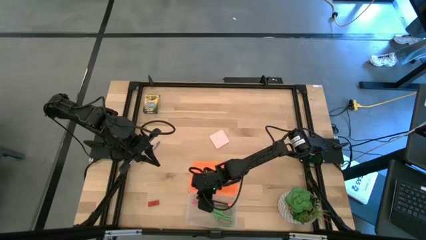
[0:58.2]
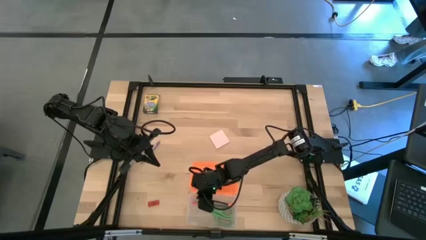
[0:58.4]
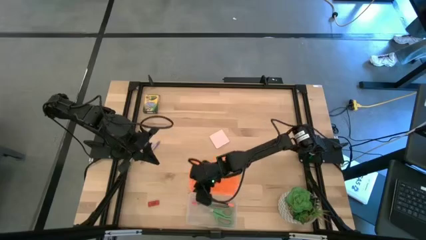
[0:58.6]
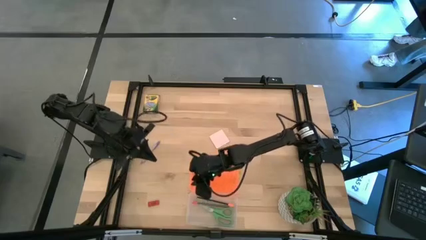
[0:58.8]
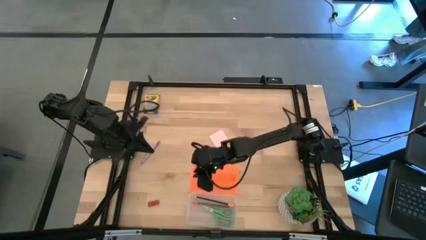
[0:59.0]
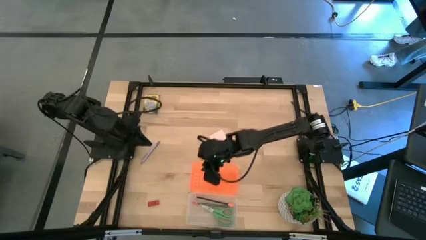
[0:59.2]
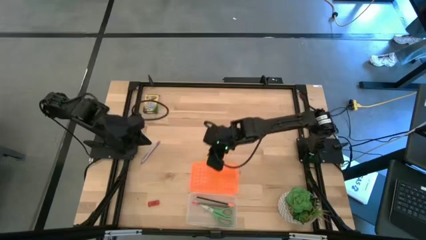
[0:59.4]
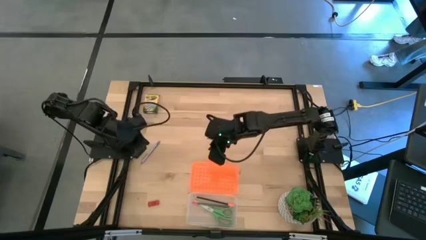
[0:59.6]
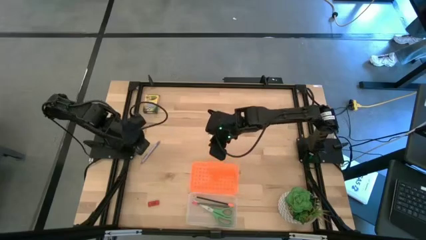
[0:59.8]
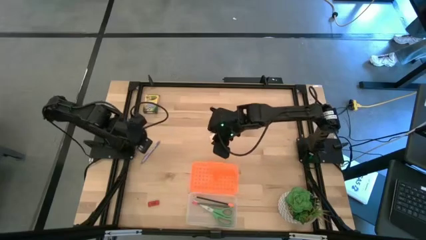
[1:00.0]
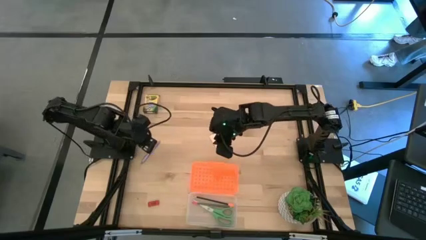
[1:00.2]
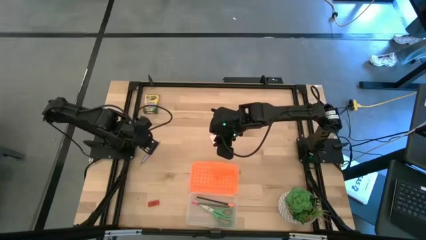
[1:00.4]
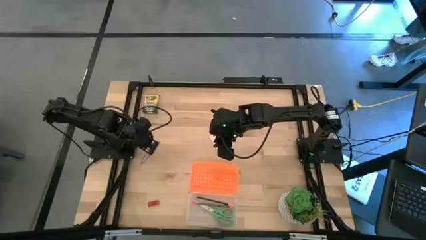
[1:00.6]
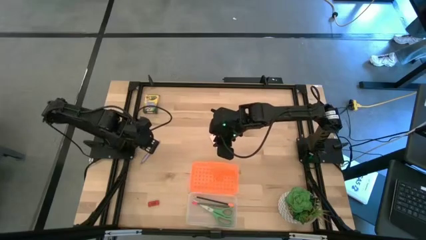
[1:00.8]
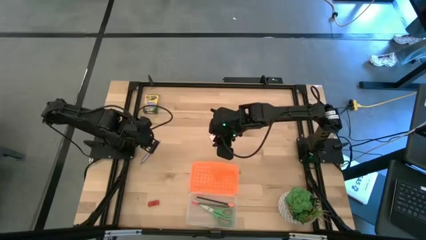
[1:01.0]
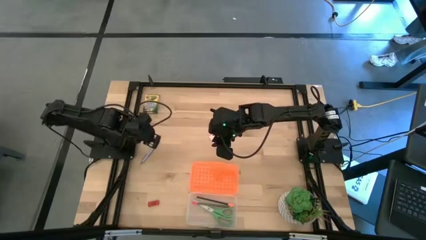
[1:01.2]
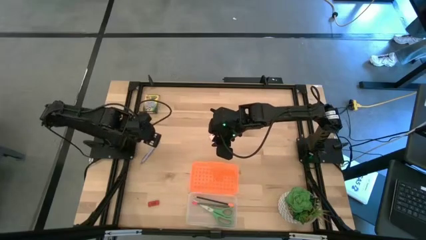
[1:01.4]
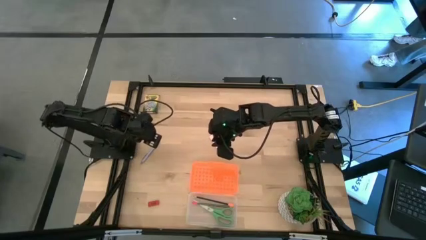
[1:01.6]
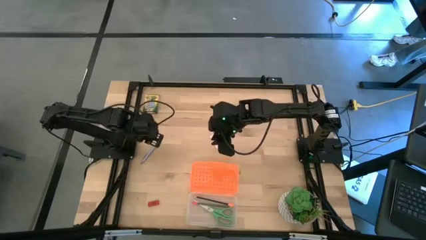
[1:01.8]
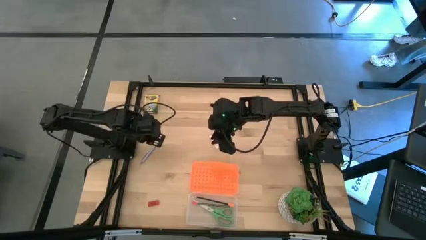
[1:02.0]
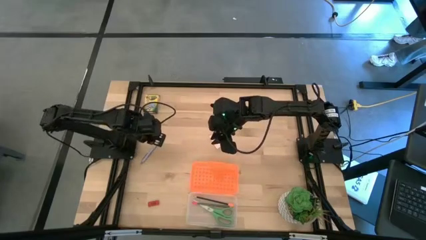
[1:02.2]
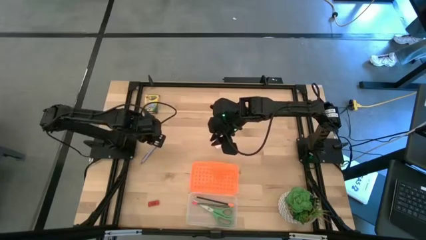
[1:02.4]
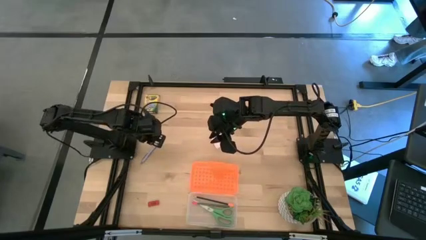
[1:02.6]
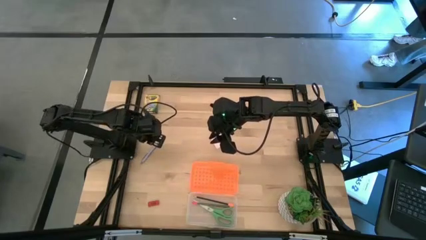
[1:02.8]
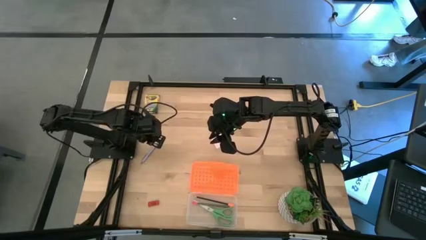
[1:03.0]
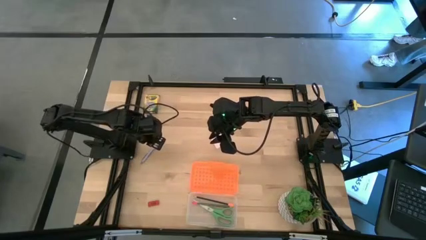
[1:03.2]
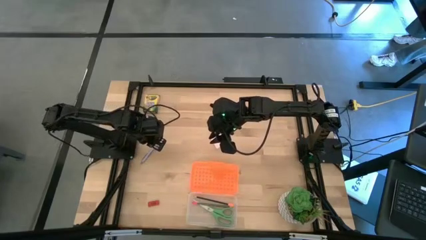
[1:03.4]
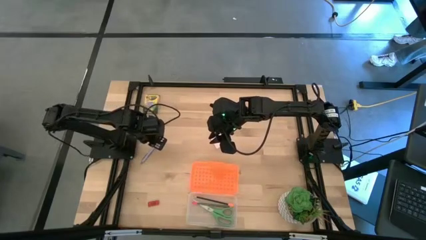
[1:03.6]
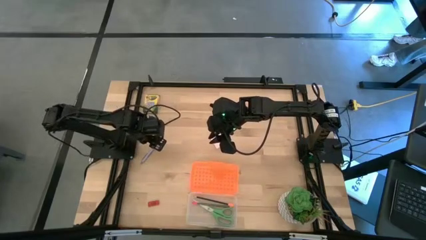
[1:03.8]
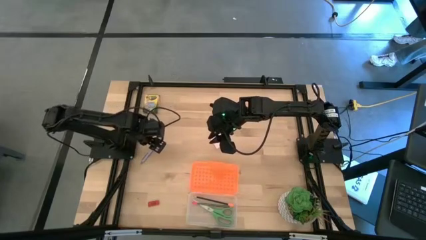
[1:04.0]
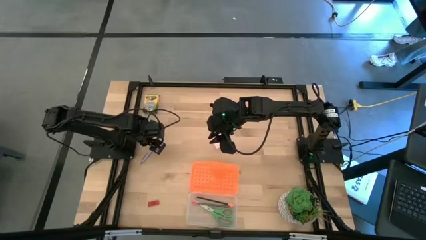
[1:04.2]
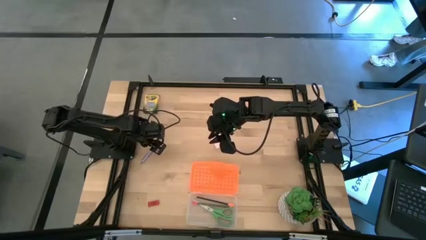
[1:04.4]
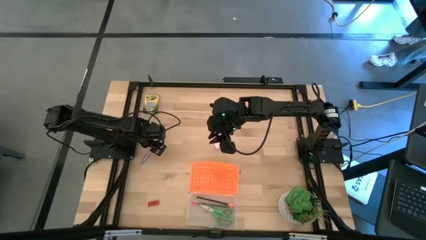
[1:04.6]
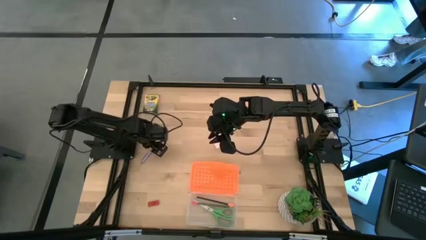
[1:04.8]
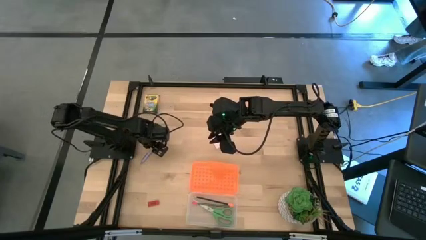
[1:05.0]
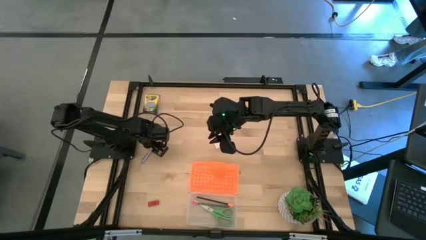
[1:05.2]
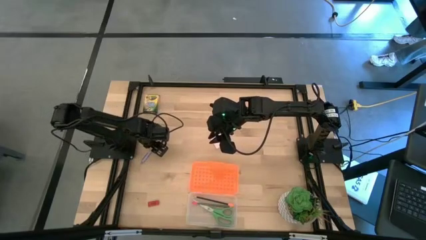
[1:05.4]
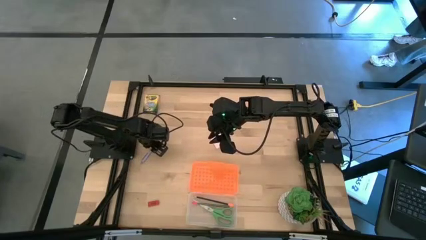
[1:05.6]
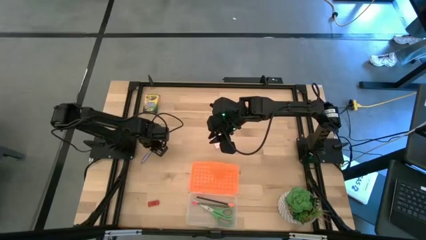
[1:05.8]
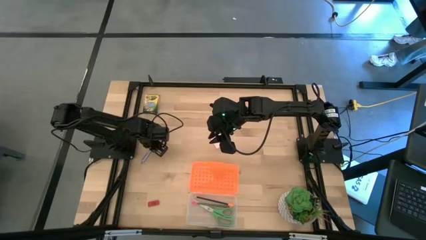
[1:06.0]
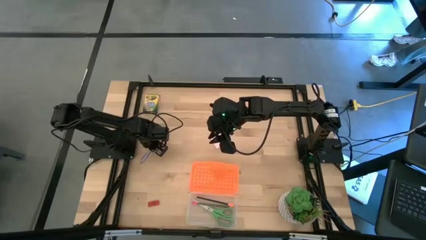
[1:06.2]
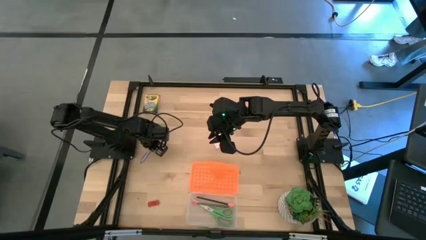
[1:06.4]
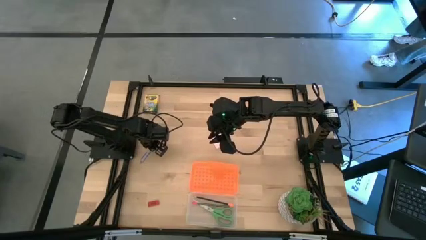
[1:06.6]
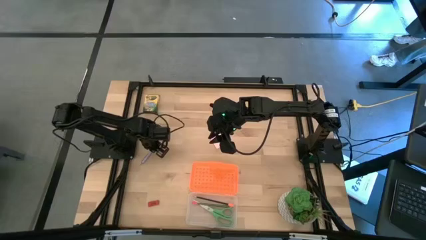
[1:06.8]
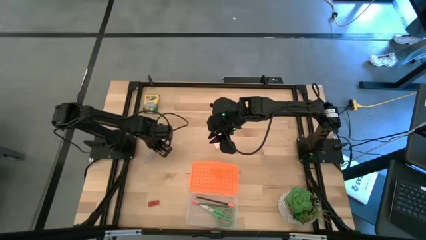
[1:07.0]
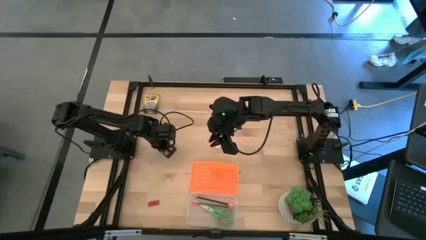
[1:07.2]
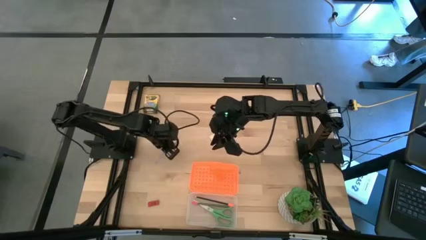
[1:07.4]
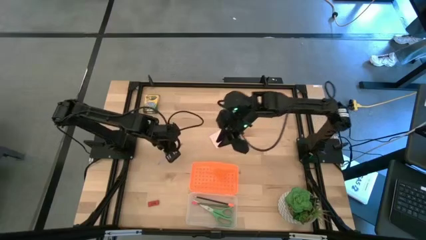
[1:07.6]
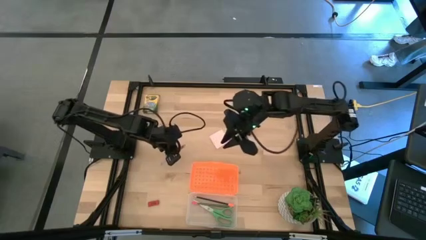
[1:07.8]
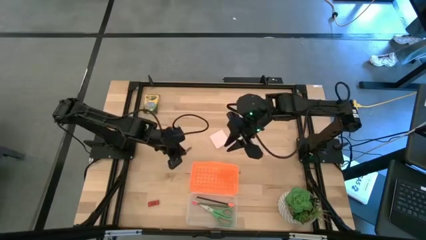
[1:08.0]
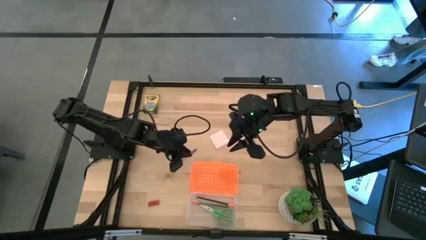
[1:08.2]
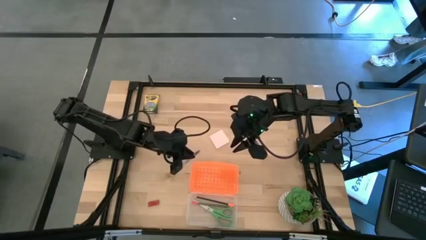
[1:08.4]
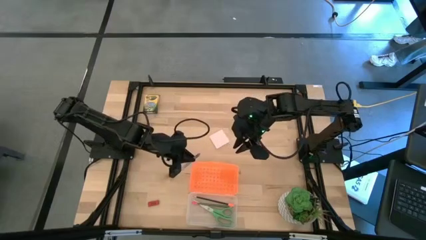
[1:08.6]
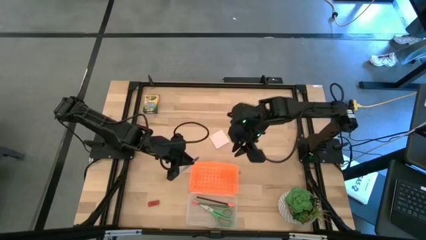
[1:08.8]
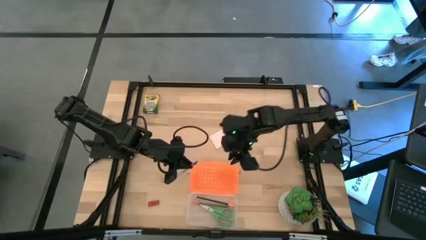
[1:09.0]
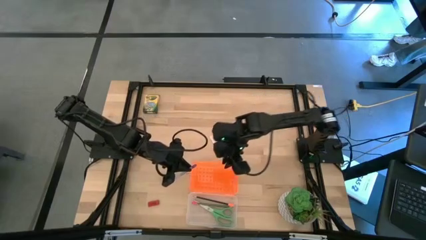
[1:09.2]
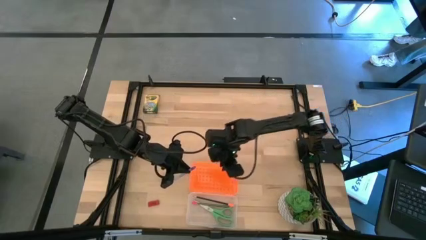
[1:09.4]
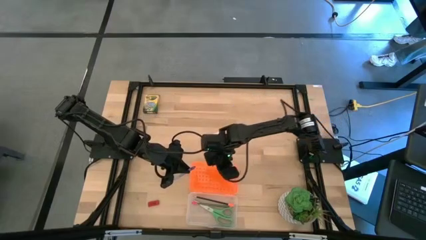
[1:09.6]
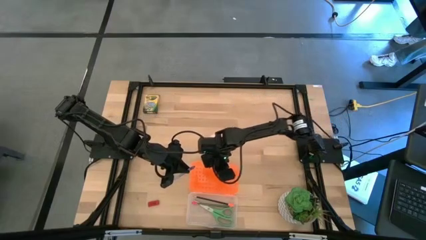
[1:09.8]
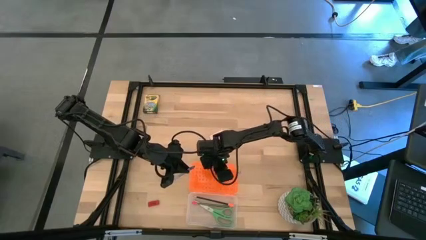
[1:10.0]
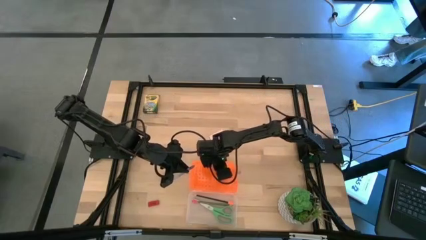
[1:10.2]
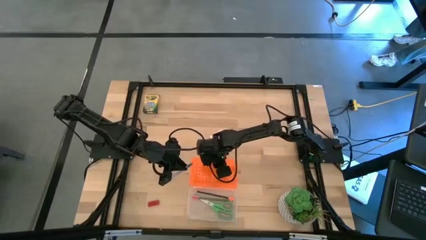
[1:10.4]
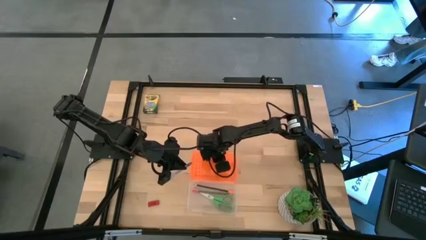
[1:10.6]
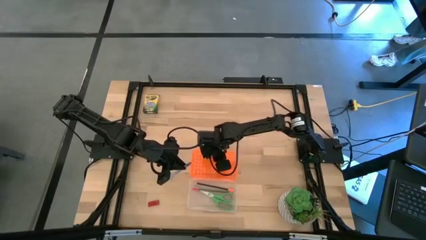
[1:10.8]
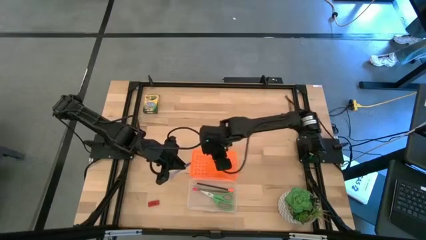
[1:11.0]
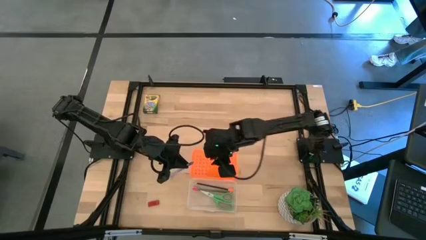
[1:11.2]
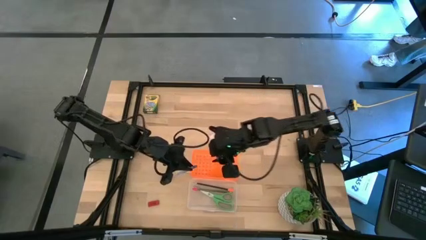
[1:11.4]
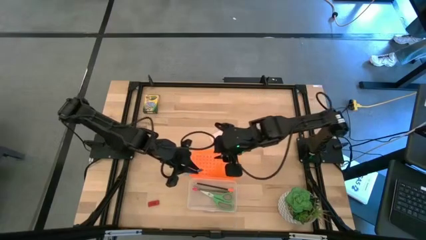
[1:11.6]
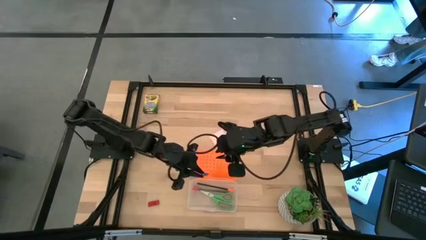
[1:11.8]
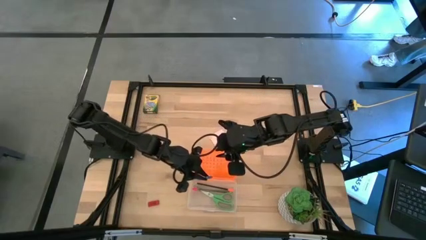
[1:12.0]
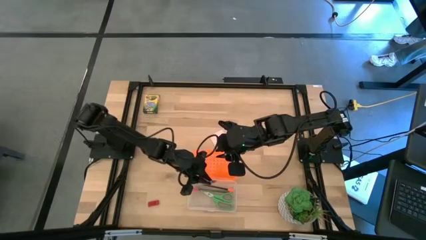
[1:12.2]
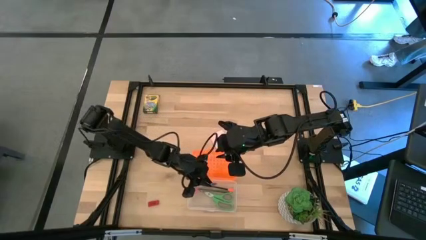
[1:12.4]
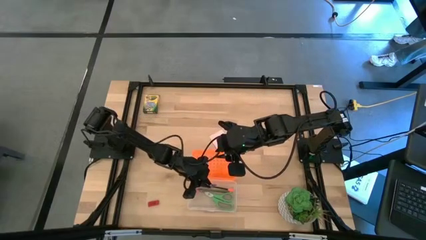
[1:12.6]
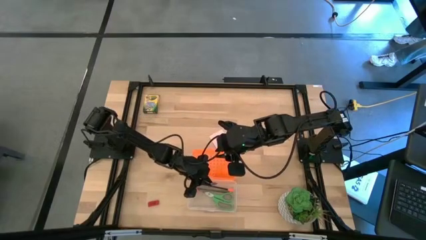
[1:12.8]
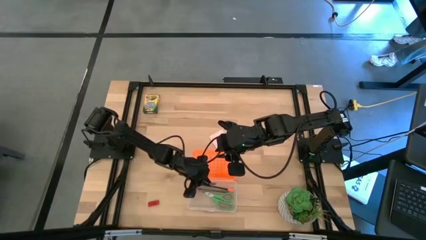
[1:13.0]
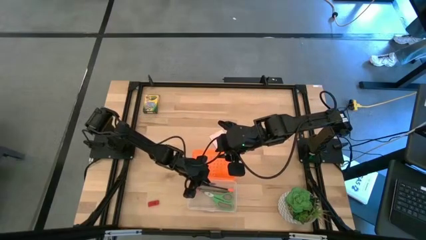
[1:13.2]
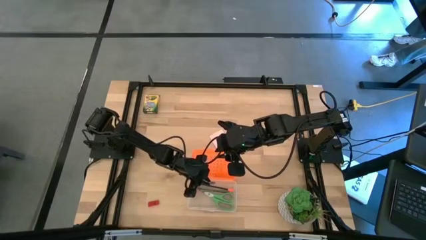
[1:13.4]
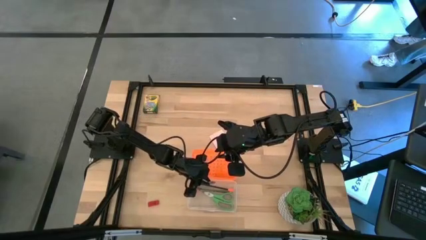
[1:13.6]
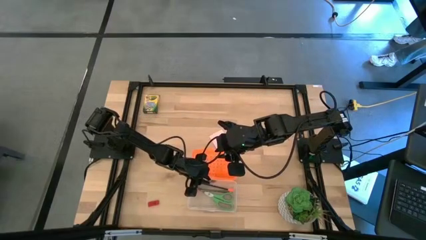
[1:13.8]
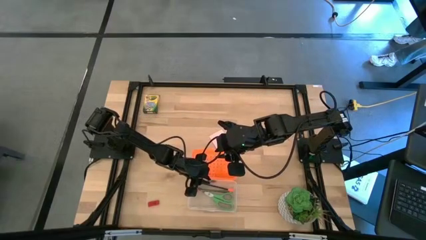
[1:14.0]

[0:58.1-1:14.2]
Task: Pack school essentials
Put the blue pen into the orange supply box

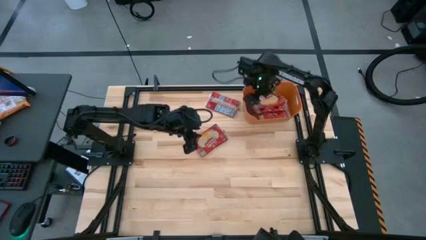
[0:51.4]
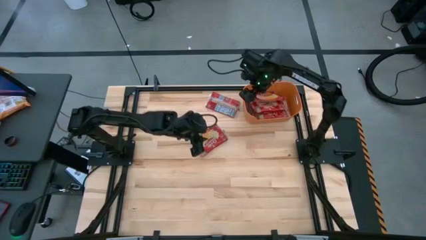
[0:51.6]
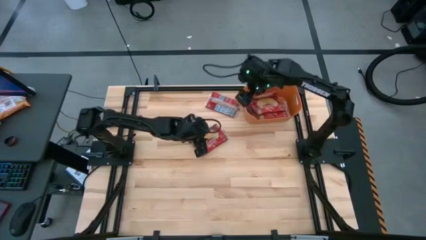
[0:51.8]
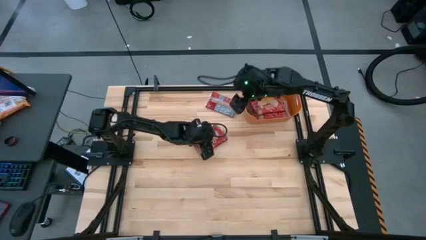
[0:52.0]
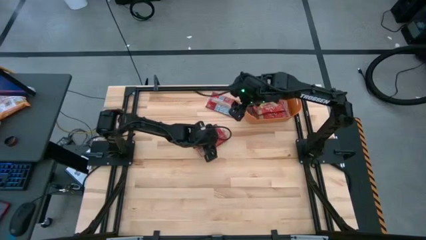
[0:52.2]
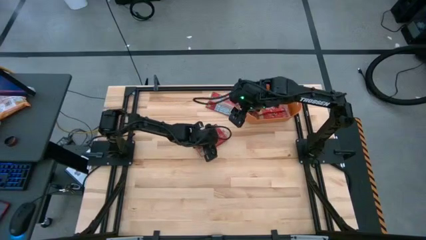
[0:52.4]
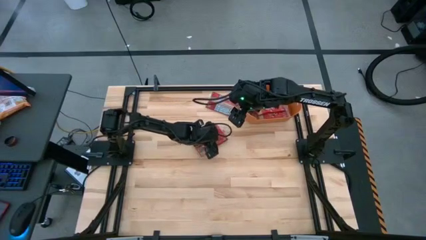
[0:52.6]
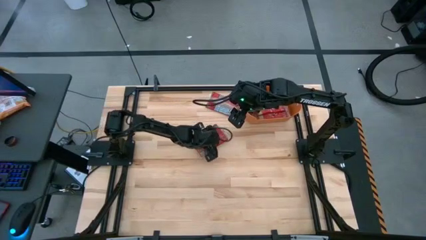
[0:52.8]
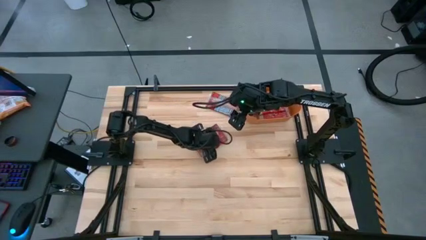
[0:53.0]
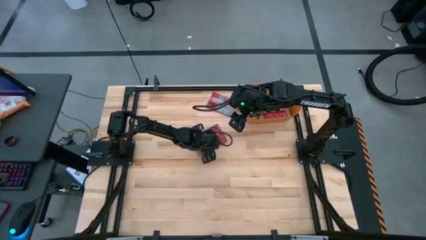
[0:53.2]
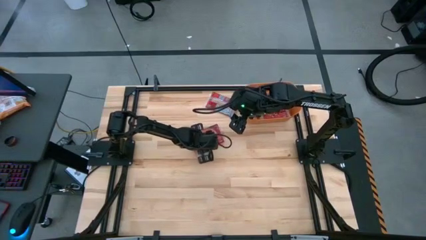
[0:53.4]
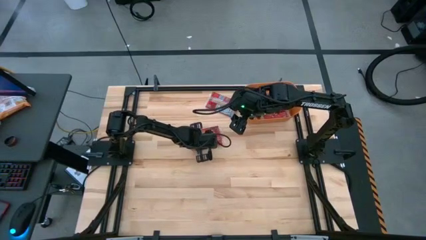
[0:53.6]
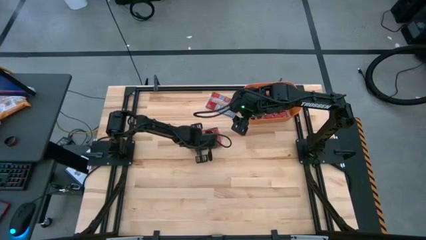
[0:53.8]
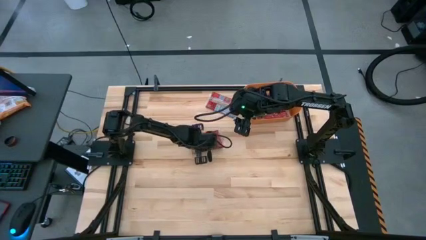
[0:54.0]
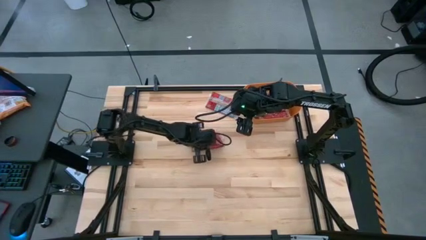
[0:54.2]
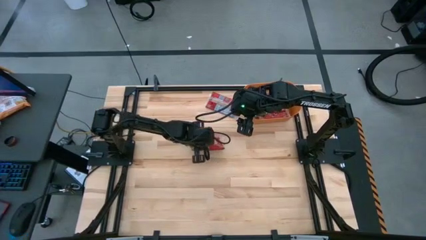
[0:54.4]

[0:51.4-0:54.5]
Task: Sort popcorn bags into baskets
Put the red popcorn bag into the orange bin
